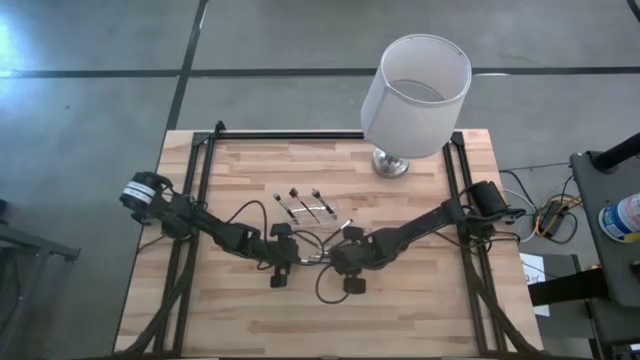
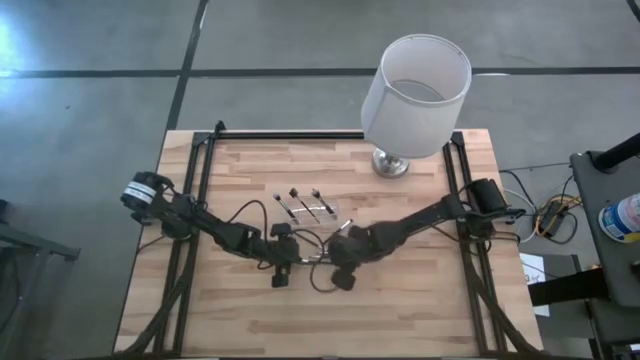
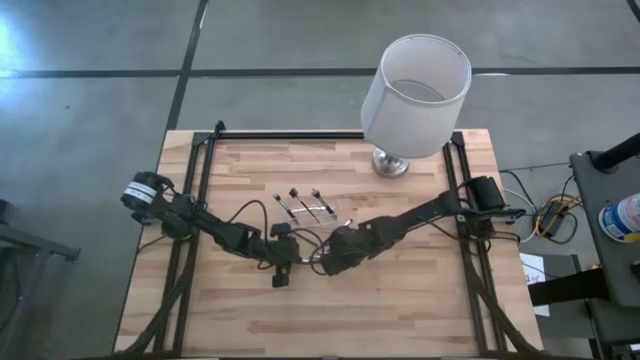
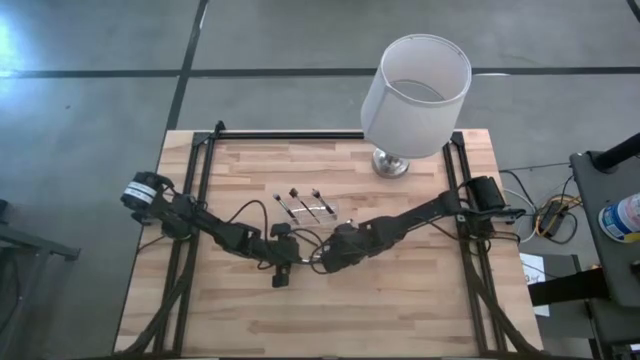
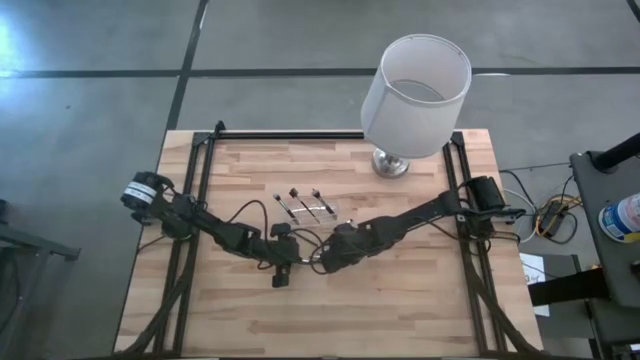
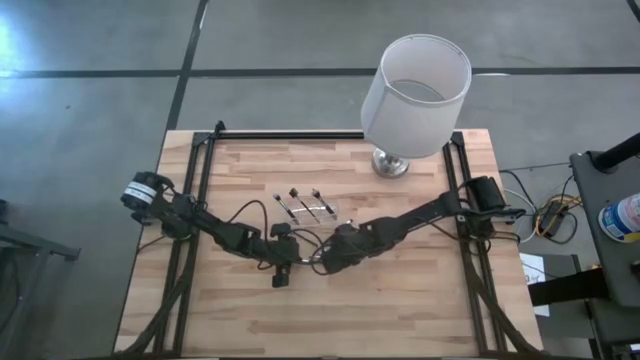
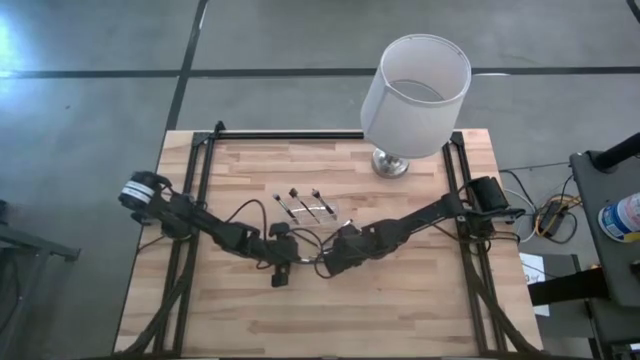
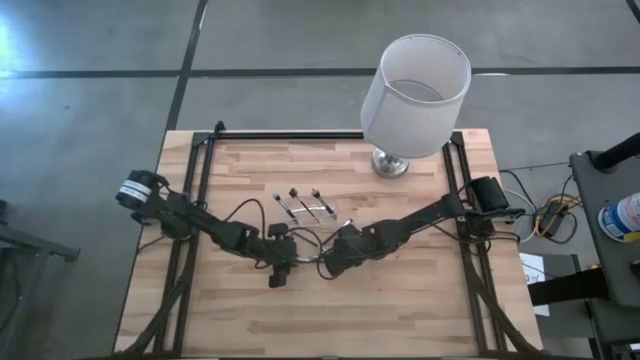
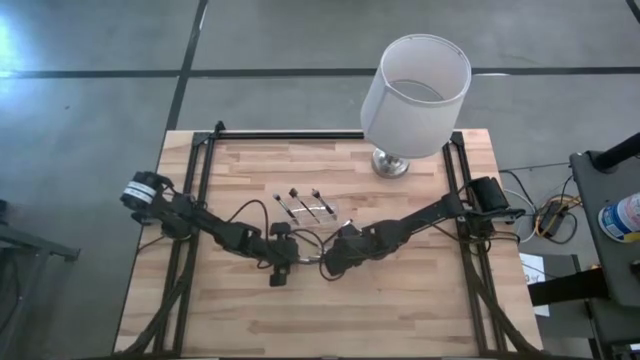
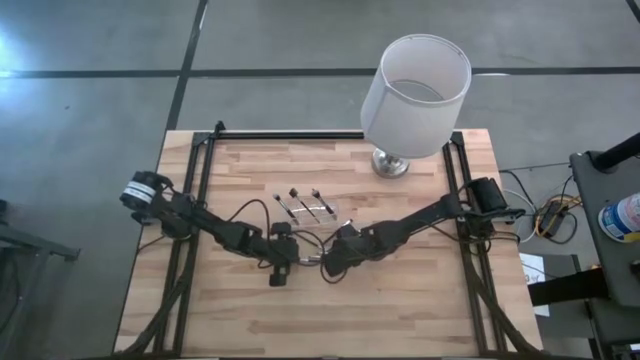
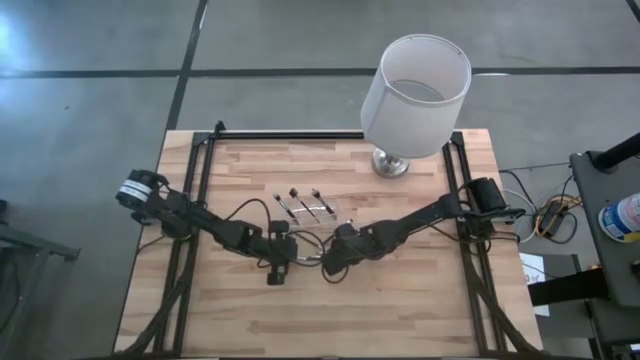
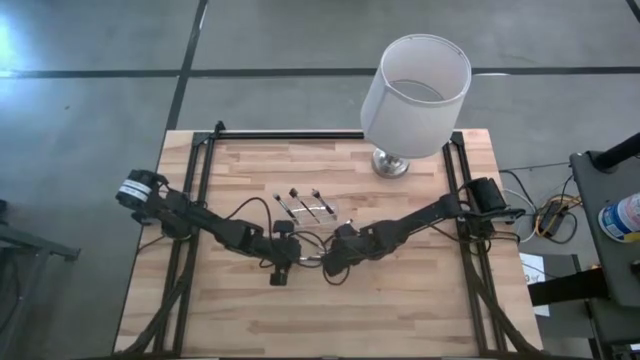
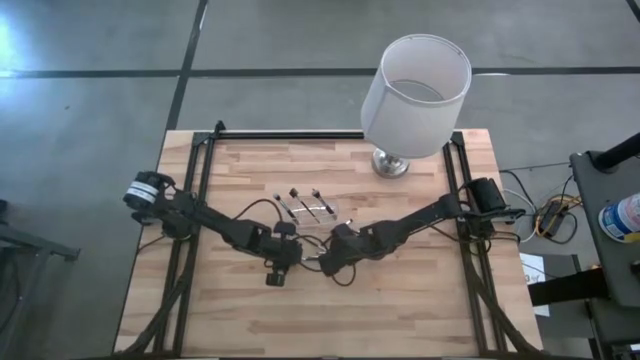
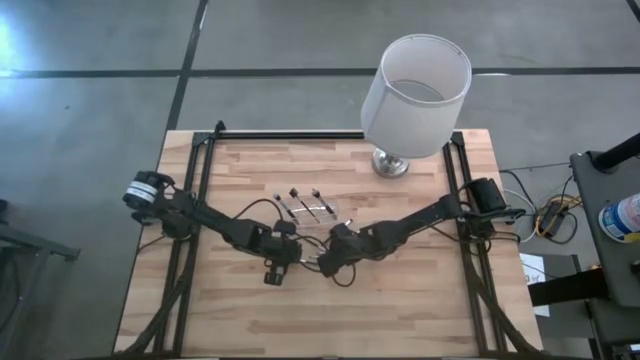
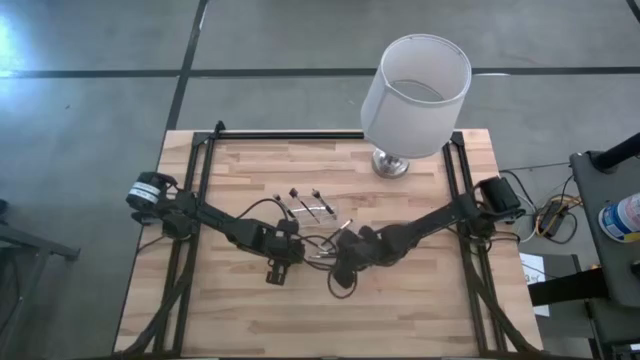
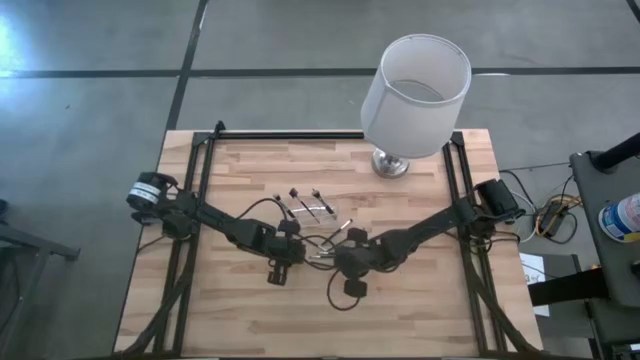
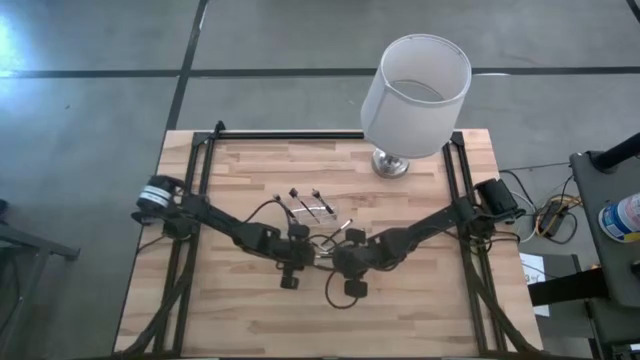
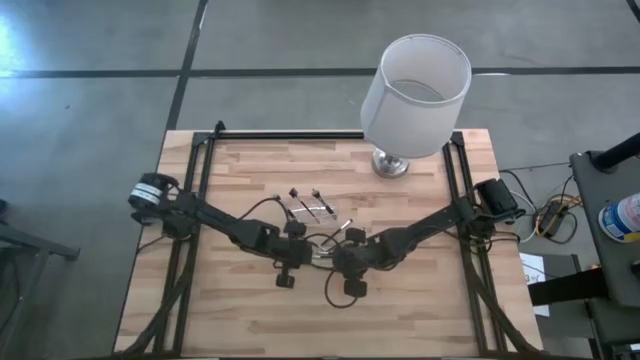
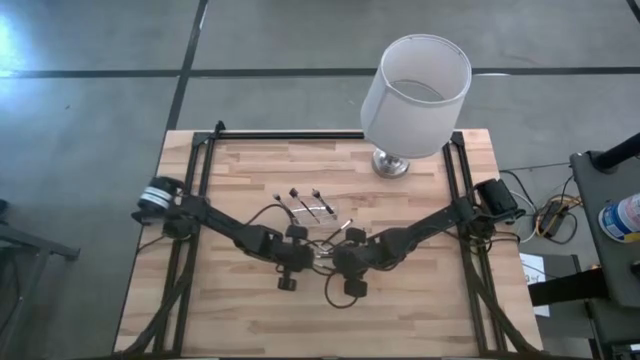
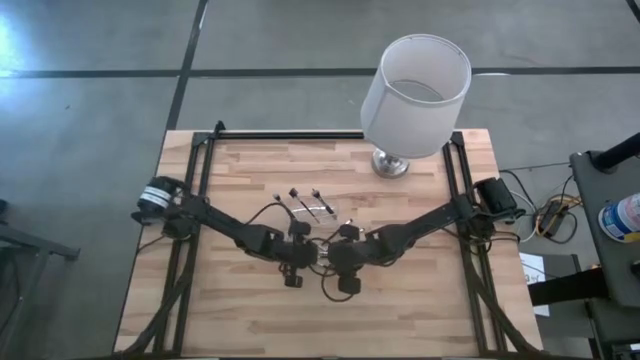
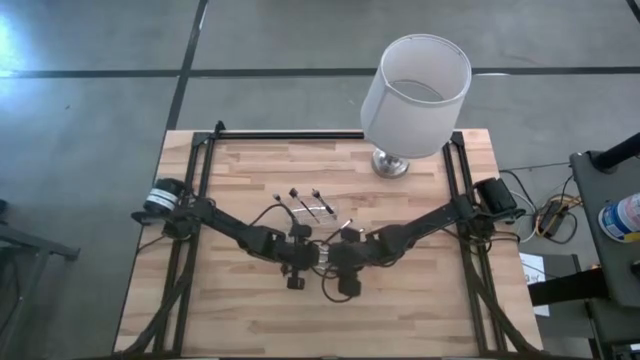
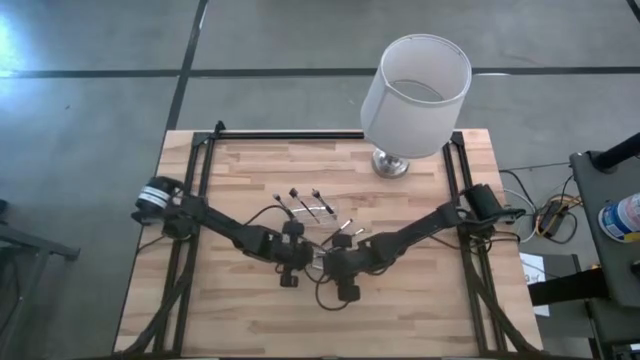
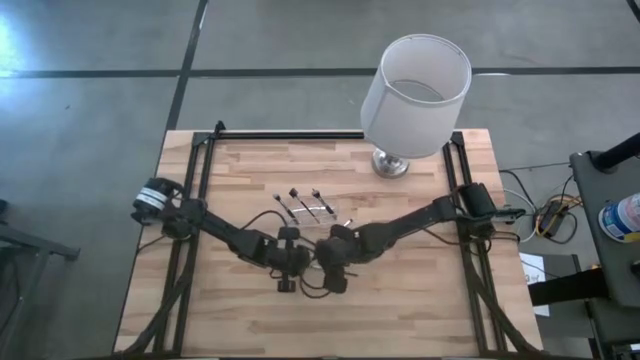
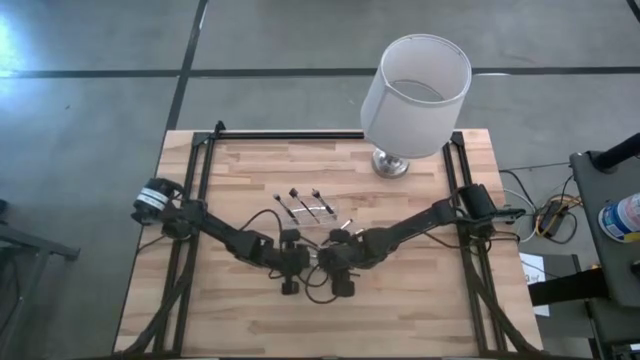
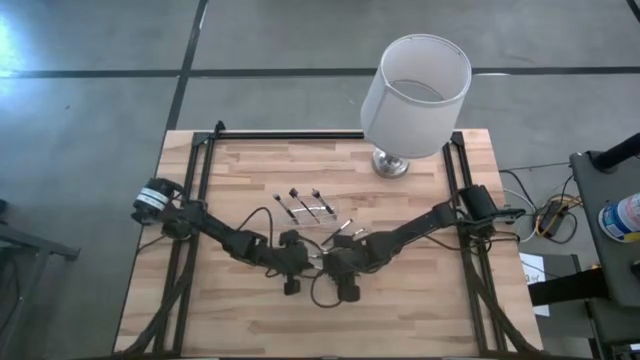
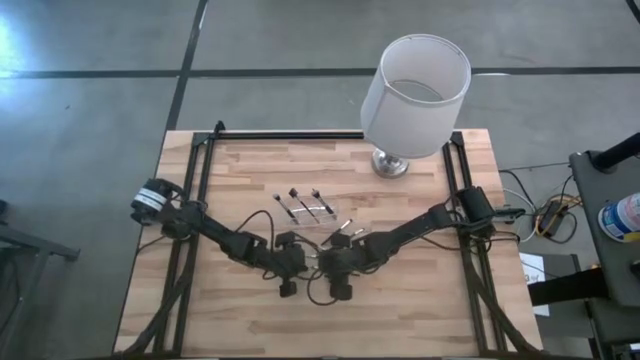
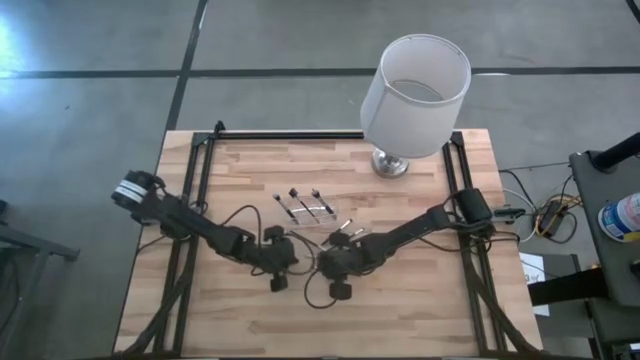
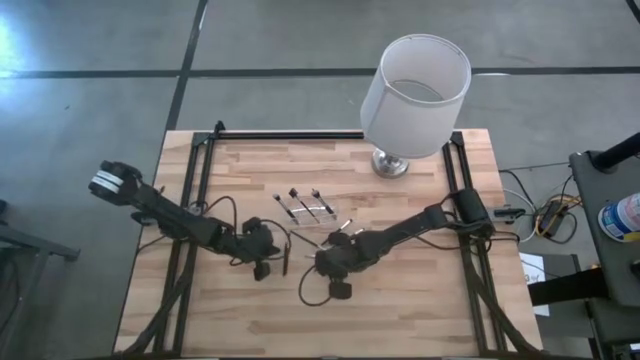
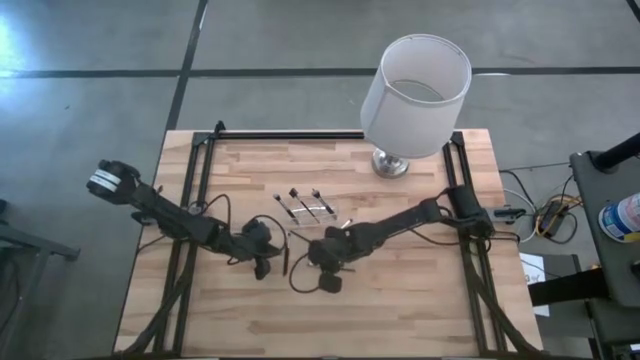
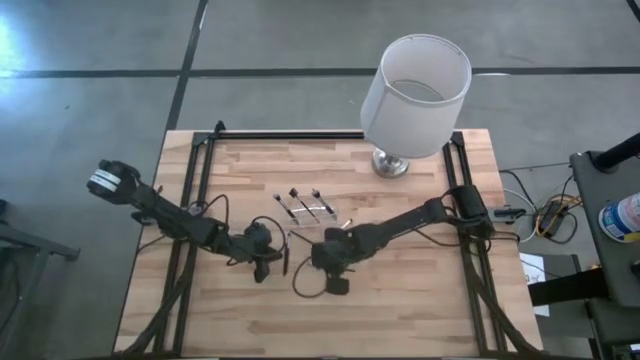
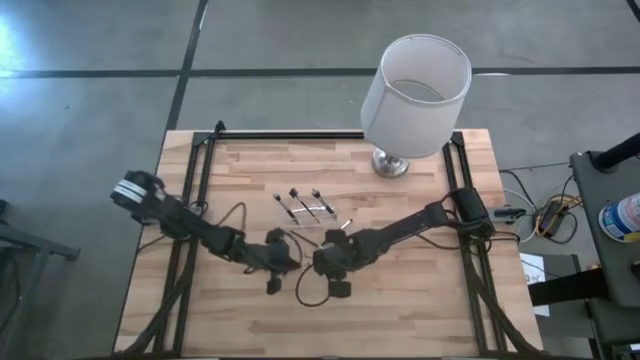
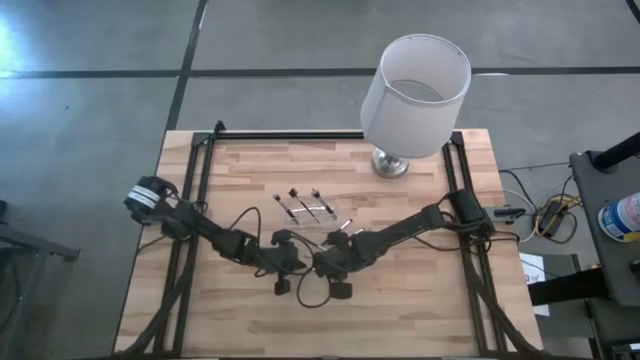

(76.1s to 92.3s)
Task: Put items in baskets/containers
Put the eyeshadow brush into the transparent organizer

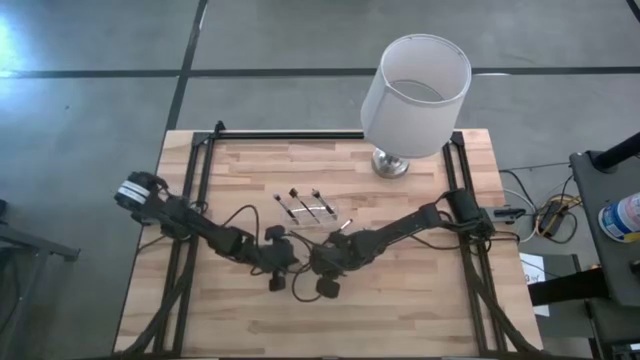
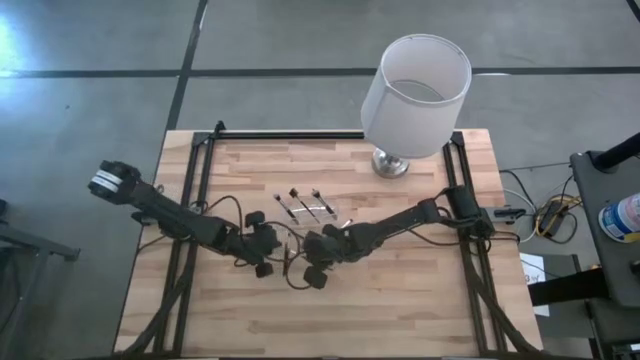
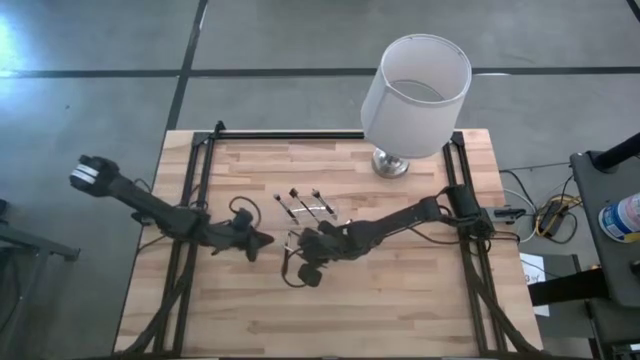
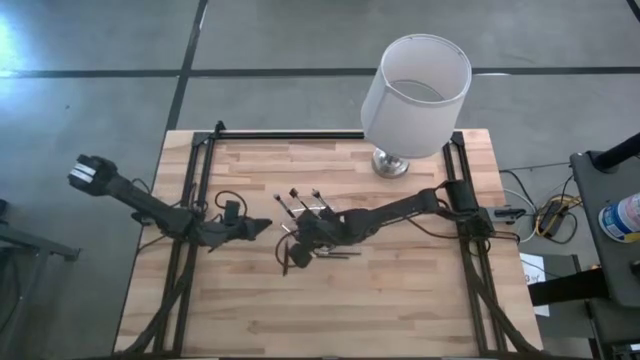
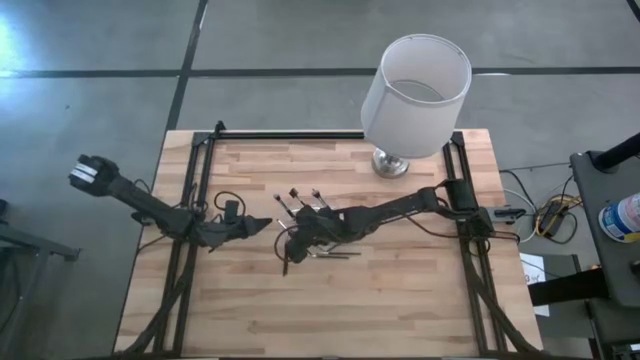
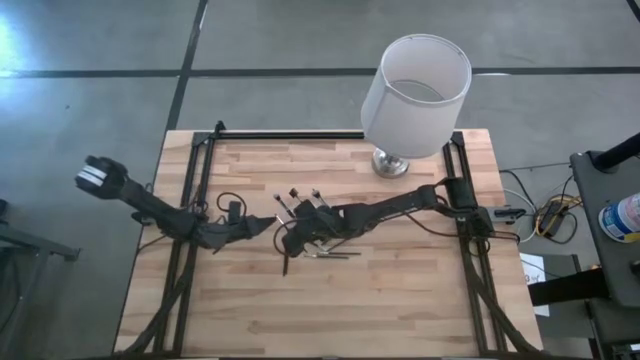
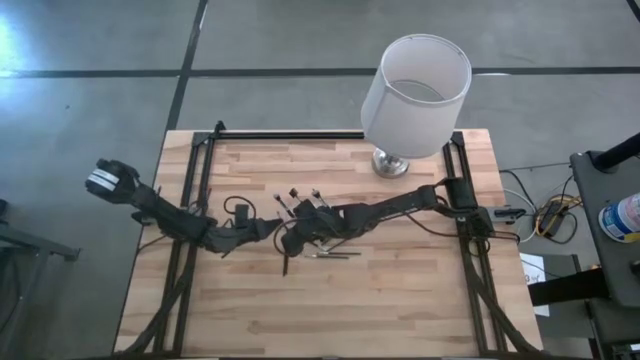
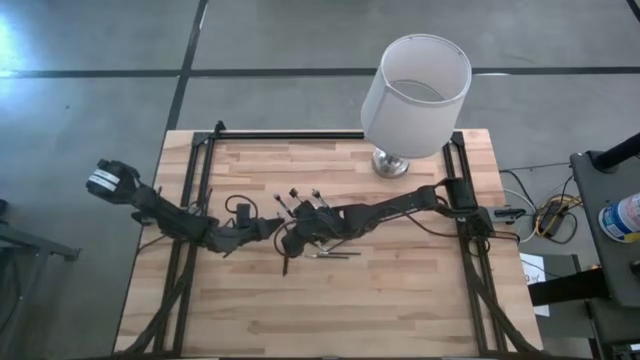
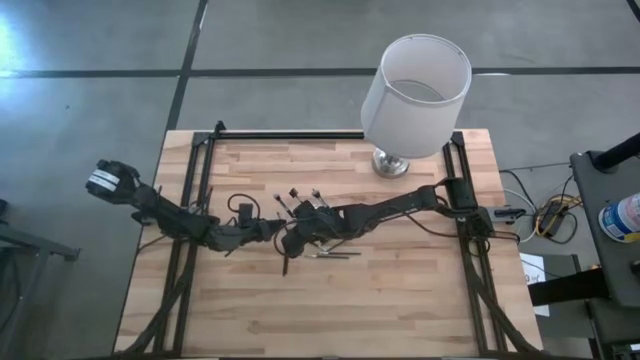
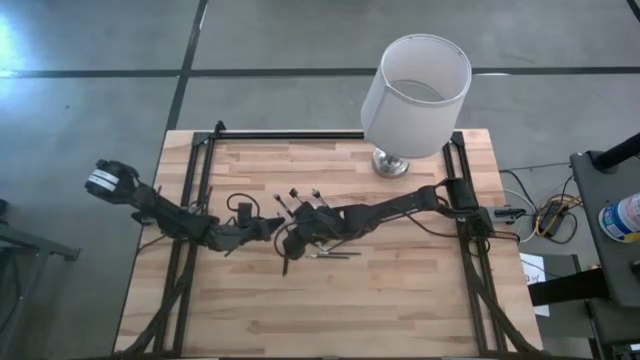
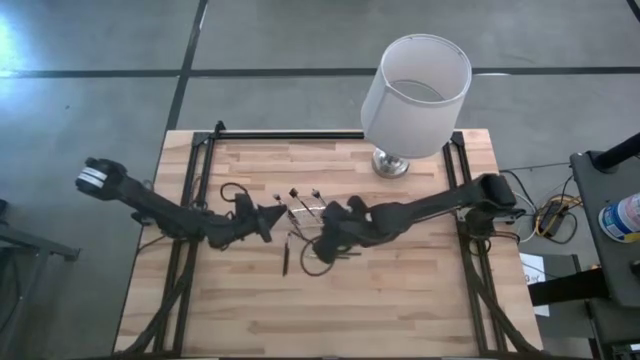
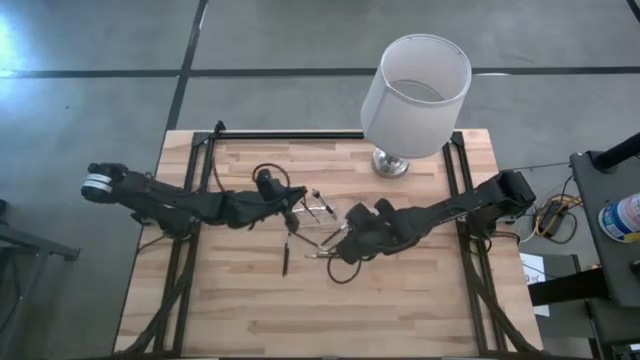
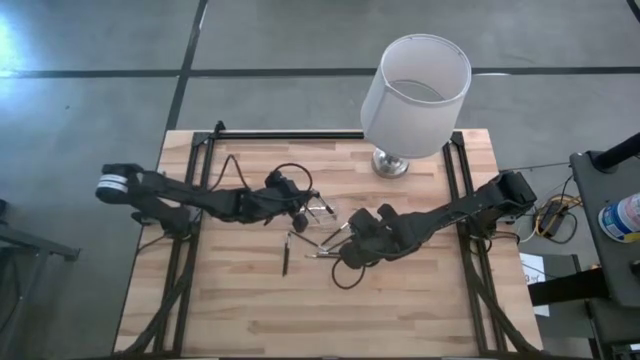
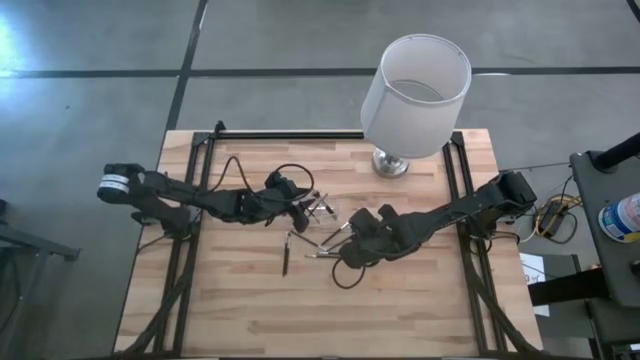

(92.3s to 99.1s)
Put the eyeshadow brush into the transparent organizer
